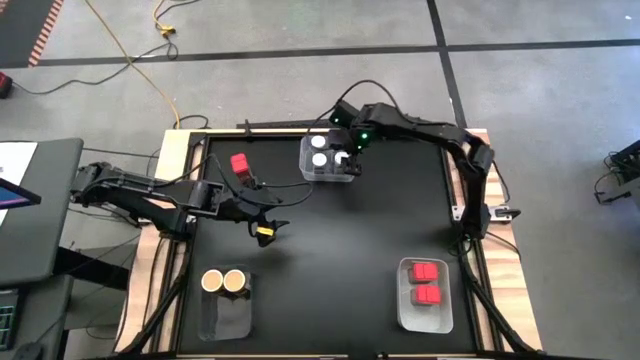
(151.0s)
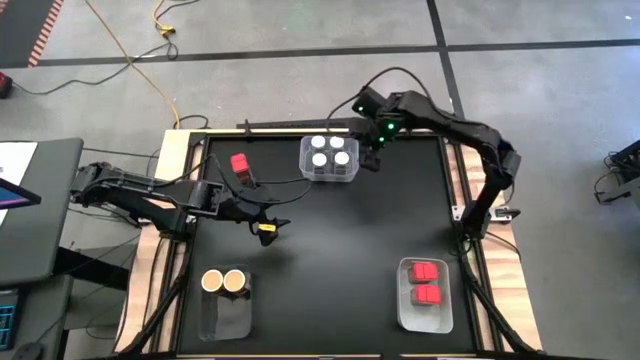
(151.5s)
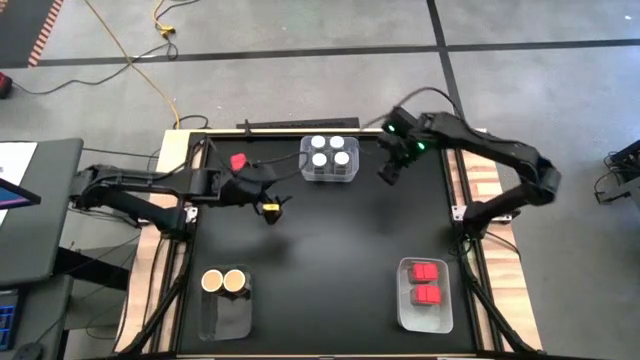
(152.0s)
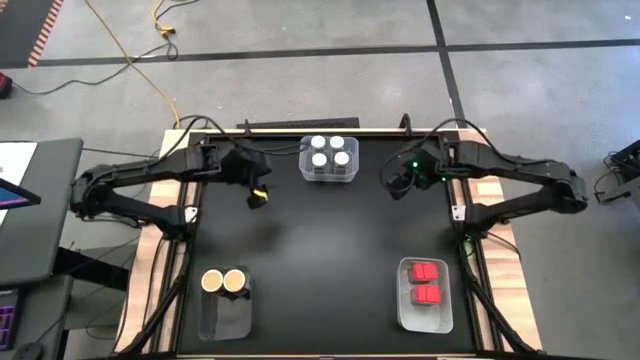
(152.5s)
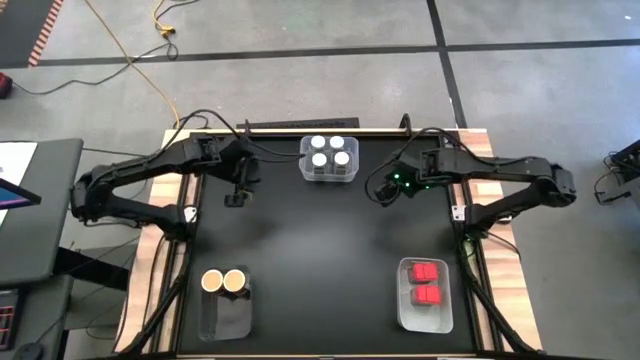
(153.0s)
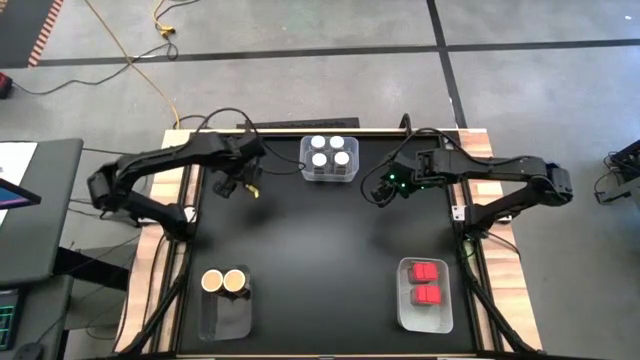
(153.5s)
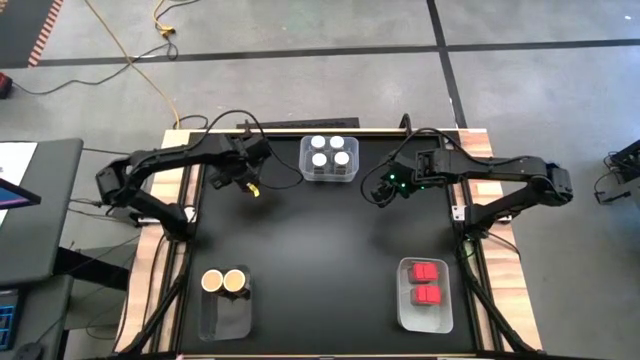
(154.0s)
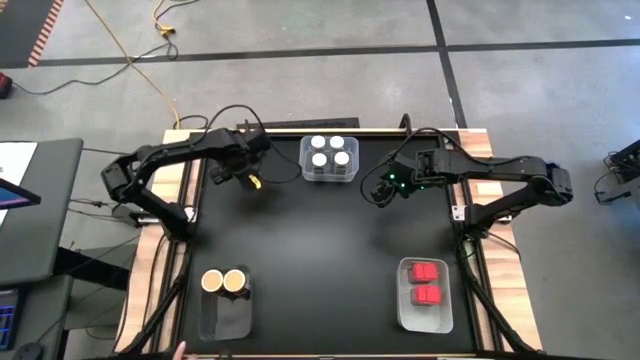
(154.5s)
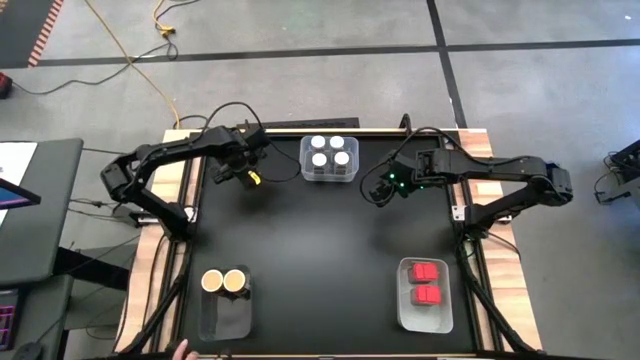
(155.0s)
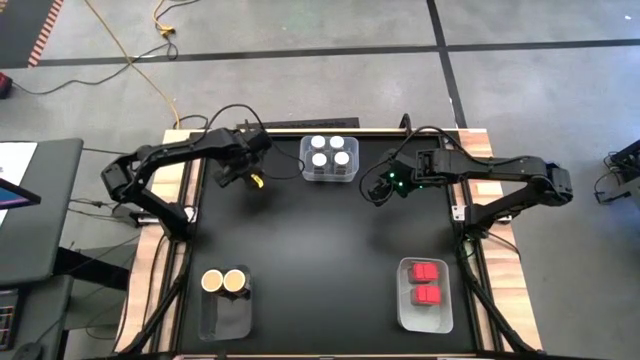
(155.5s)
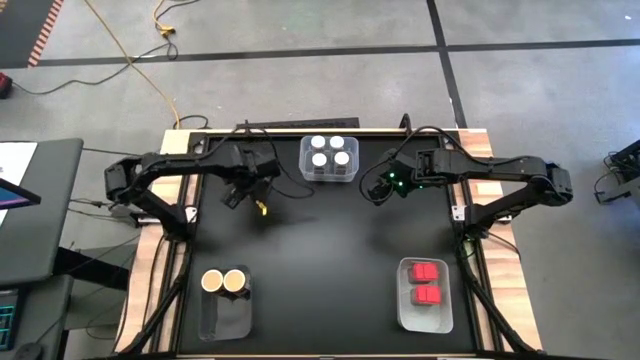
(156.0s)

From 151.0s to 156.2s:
Task: Sort spices by type
Put the red spice bottle into the white bin

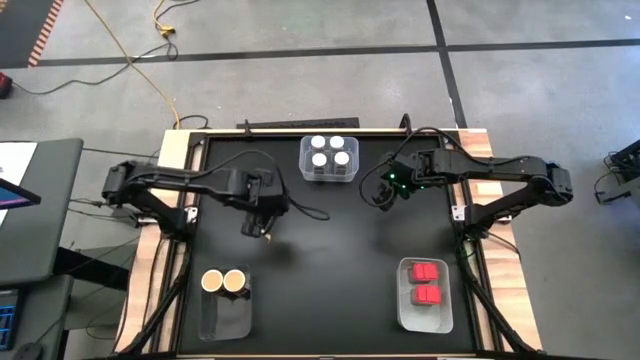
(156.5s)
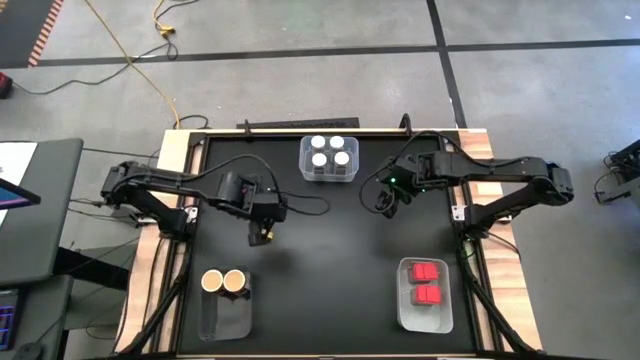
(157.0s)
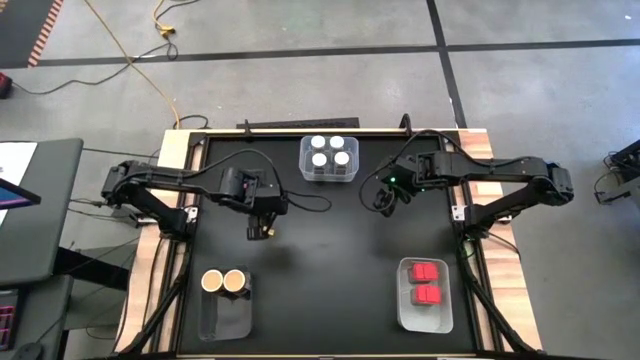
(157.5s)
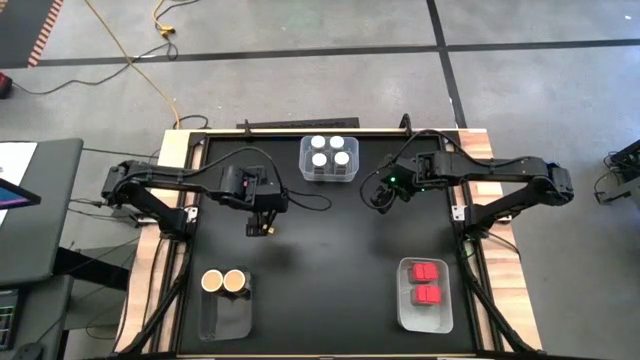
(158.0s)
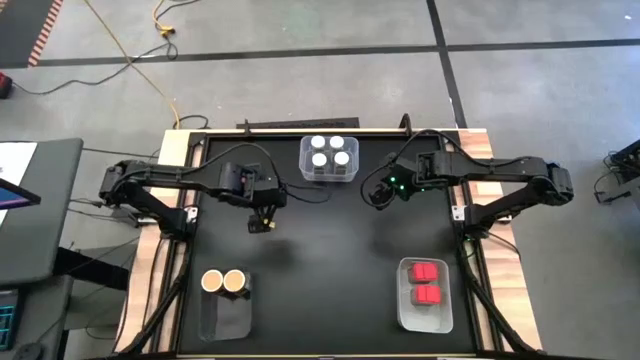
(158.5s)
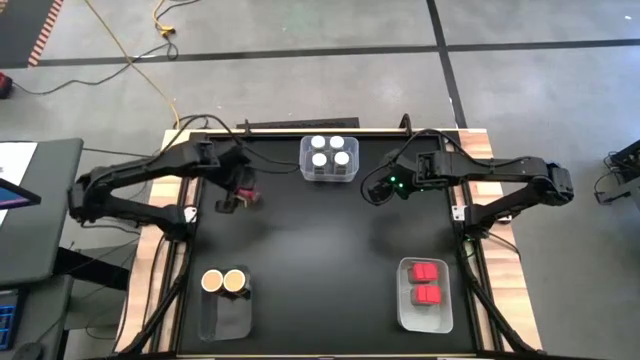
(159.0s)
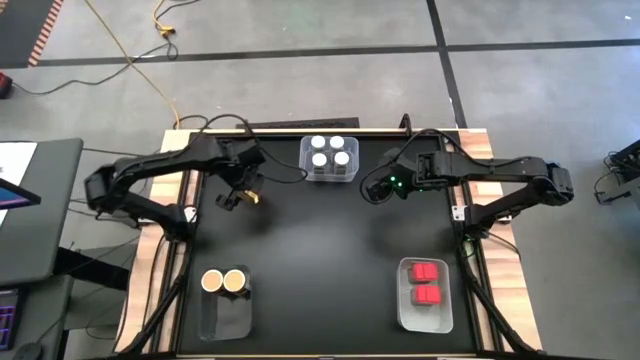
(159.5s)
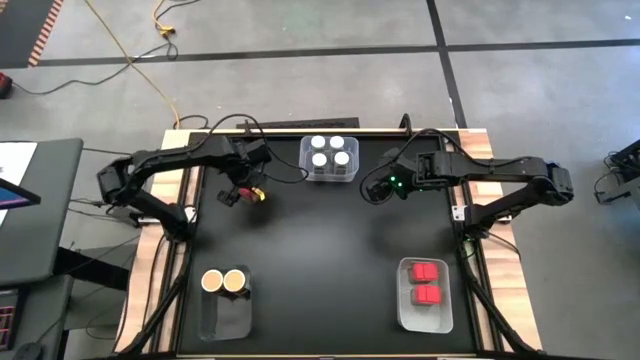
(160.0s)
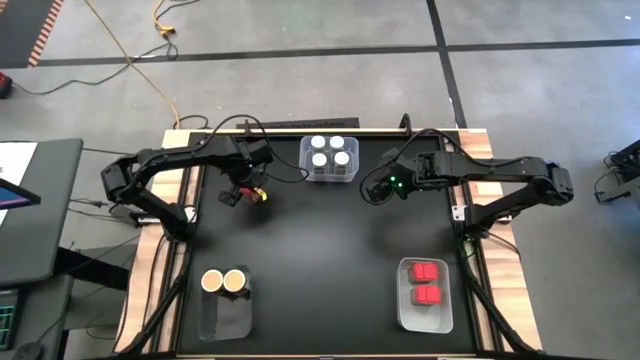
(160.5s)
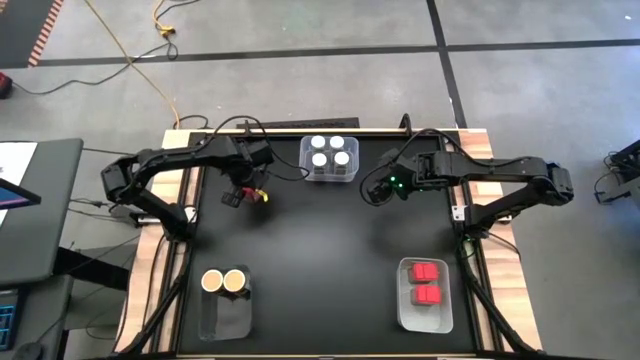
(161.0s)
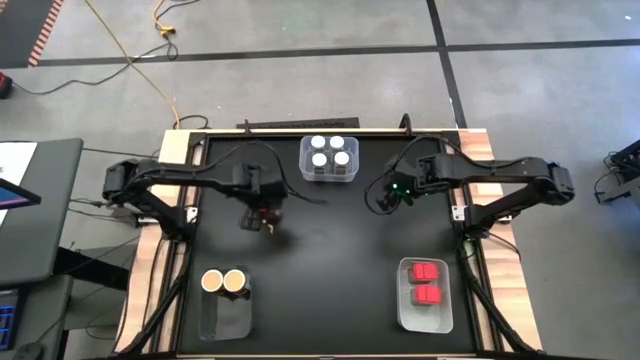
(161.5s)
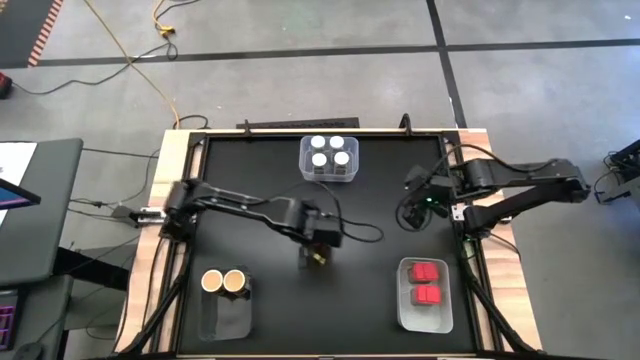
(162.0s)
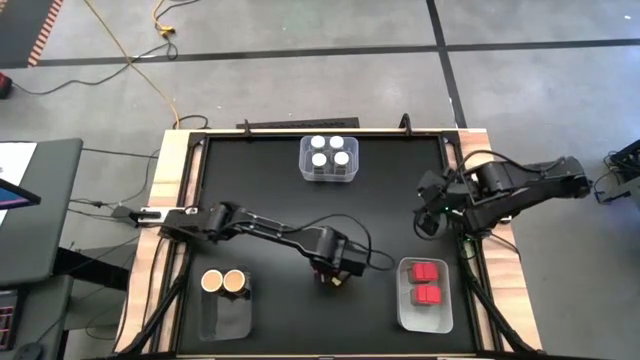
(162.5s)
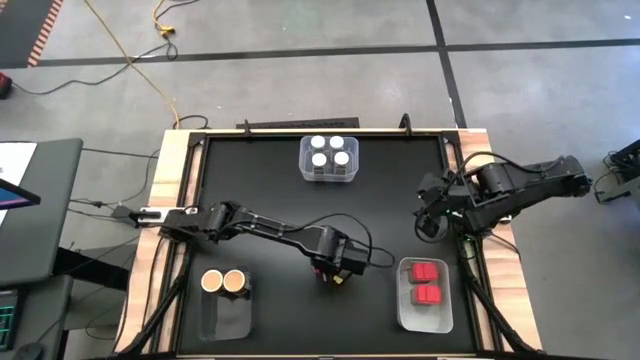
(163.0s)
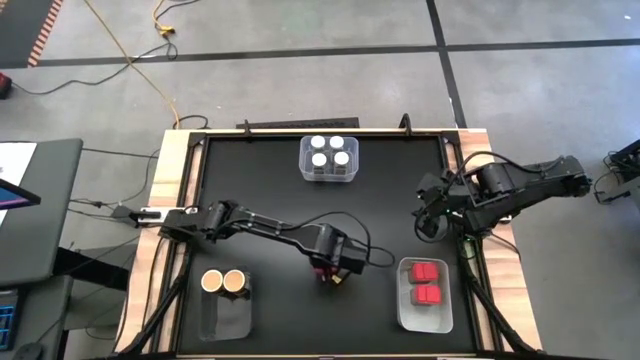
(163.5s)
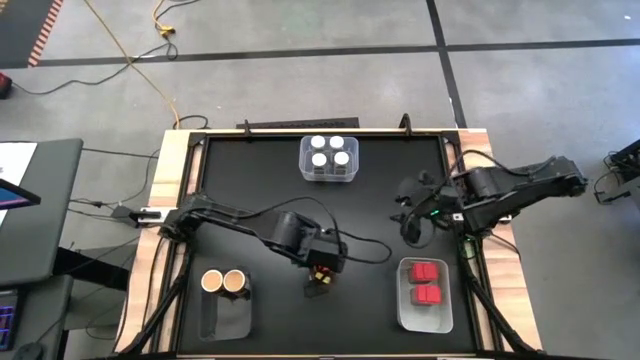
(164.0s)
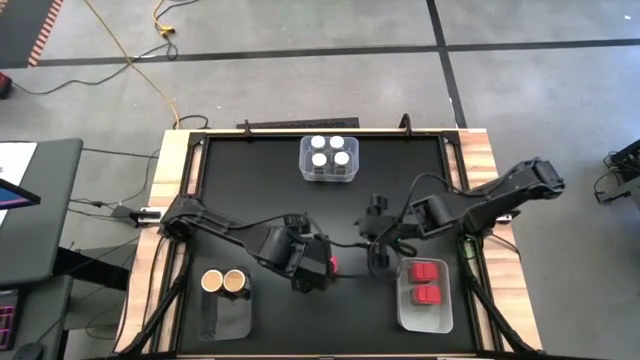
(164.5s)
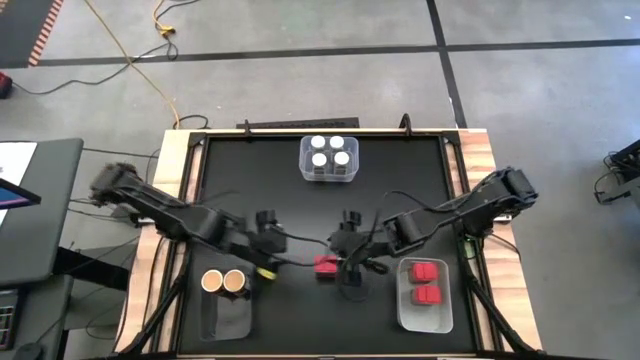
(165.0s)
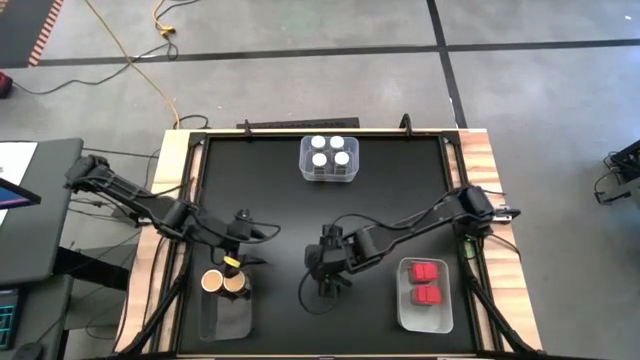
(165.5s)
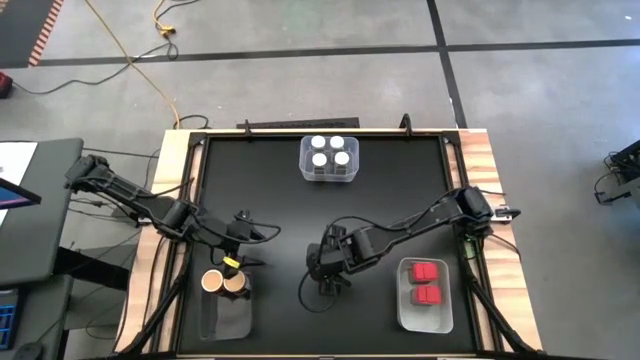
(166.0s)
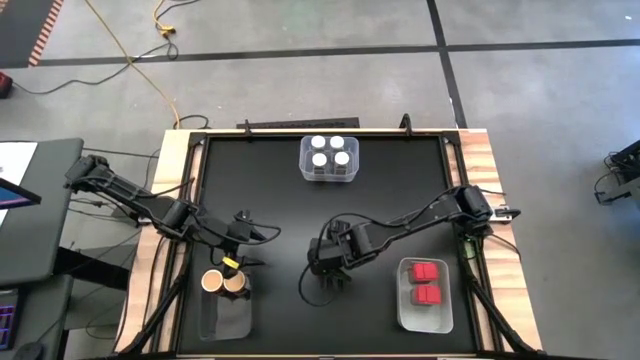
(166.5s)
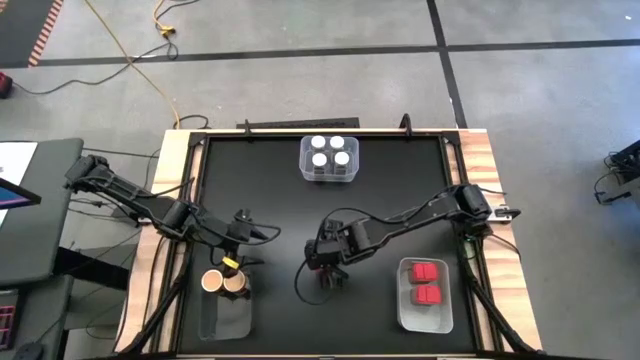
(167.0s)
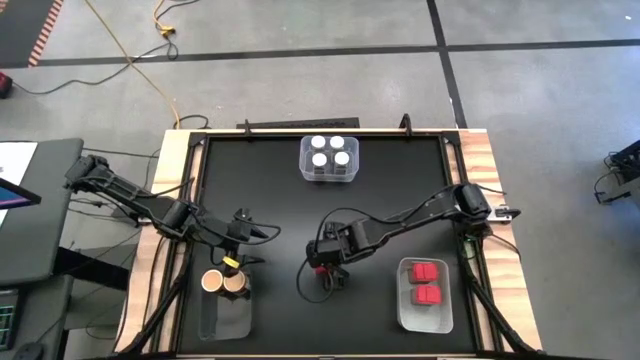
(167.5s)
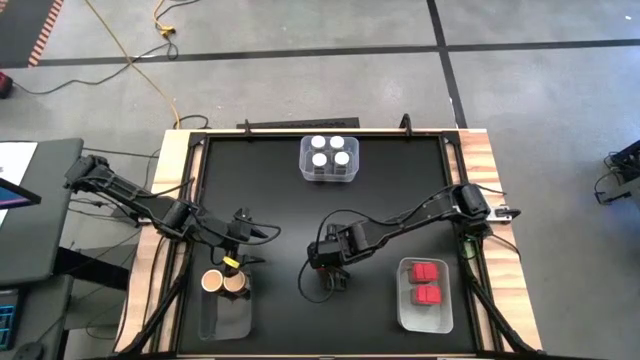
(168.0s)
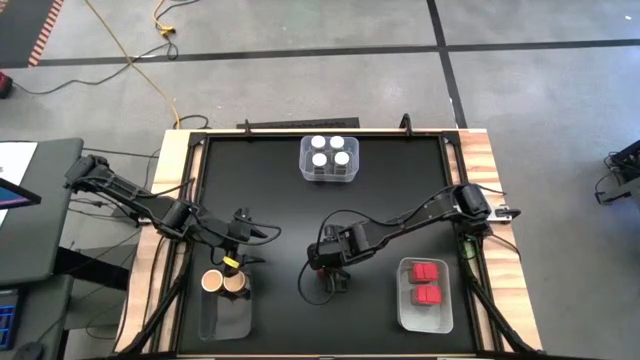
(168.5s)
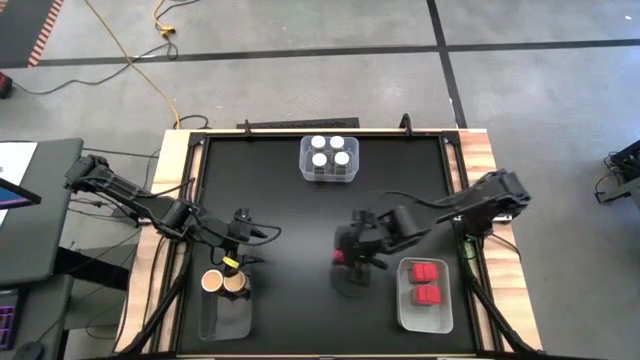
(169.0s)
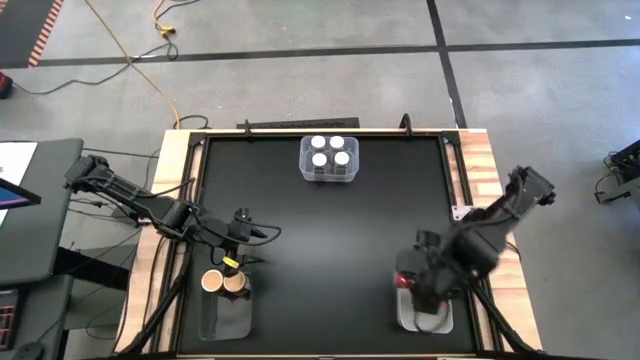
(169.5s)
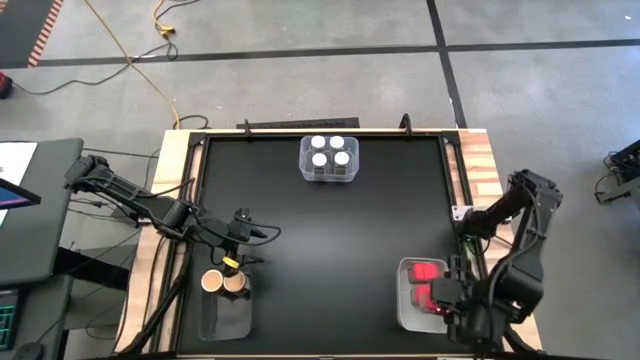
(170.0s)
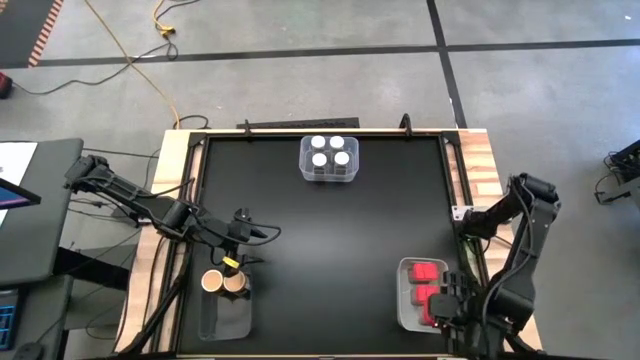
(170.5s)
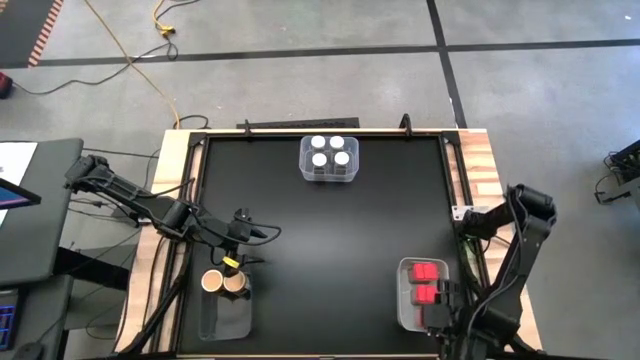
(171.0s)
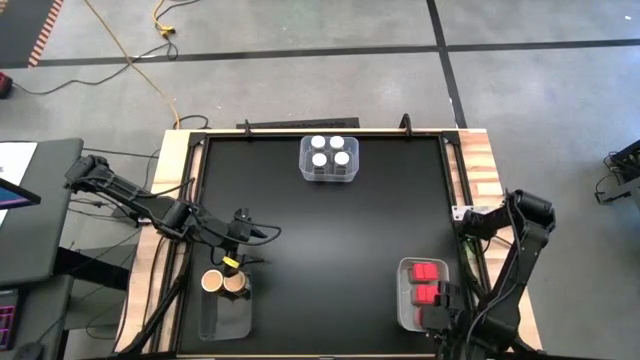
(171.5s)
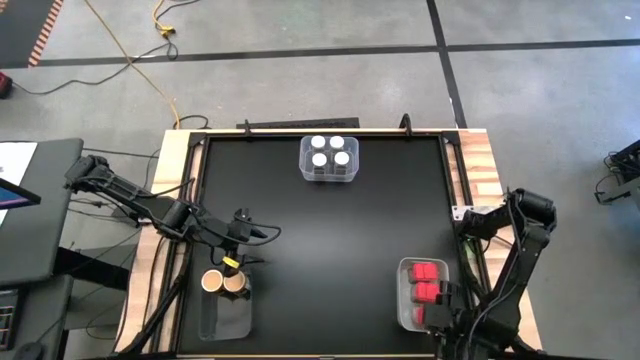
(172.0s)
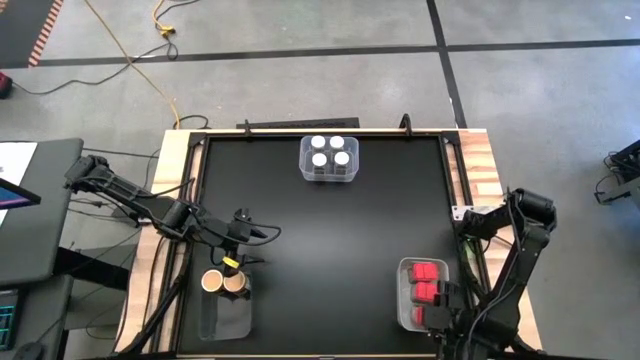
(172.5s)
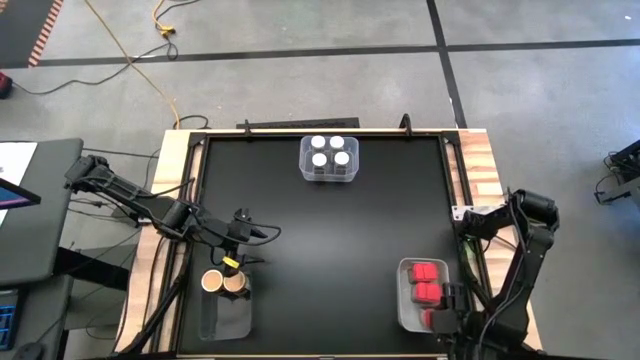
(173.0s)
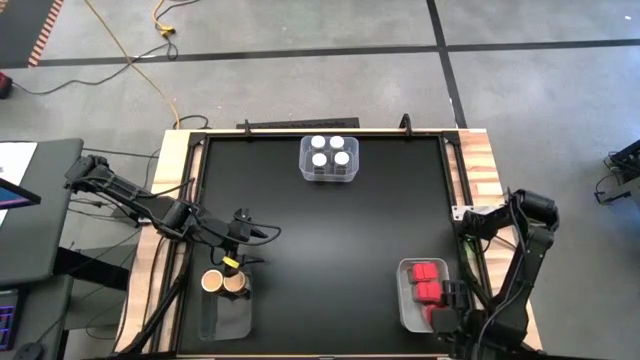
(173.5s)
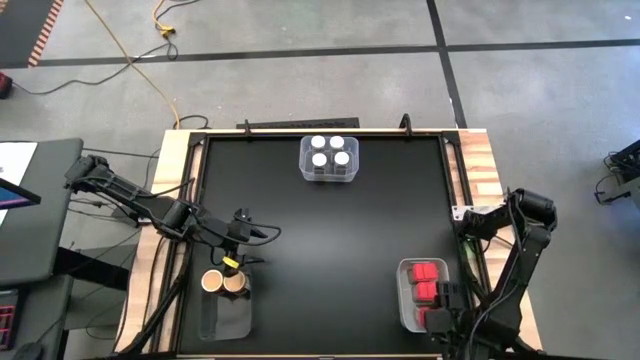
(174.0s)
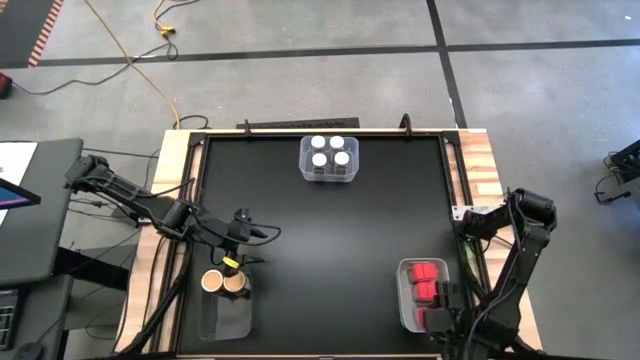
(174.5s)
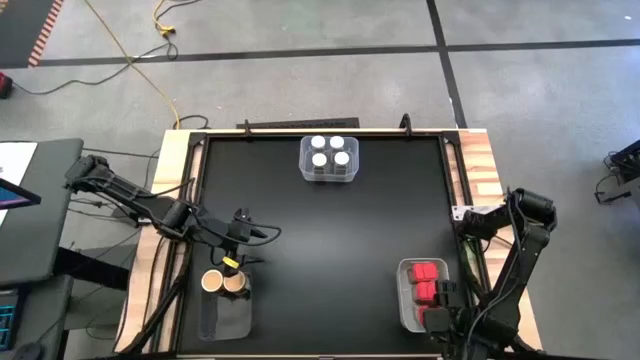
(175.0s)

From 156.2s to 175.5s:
Put the red spice bottle into the white bin
